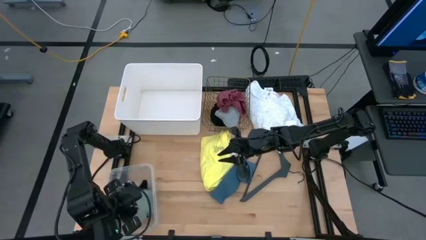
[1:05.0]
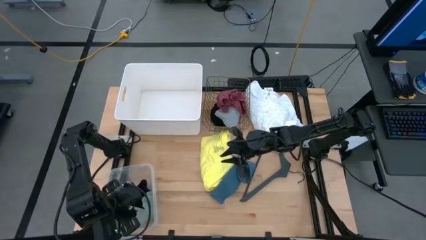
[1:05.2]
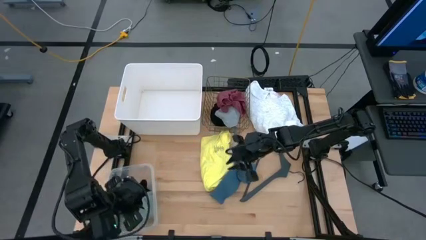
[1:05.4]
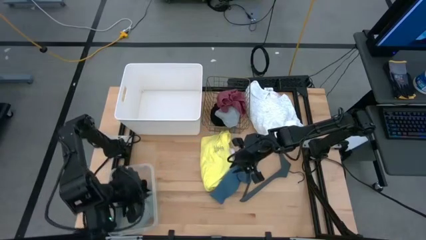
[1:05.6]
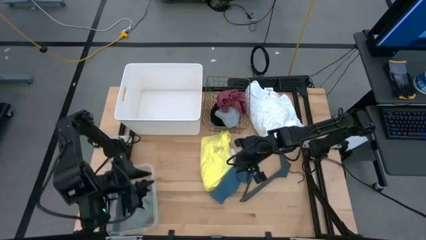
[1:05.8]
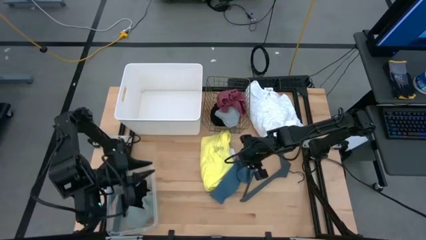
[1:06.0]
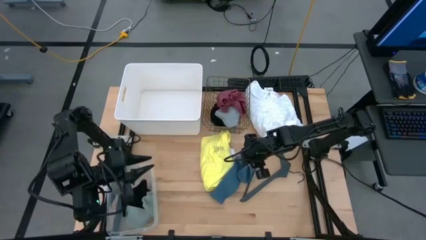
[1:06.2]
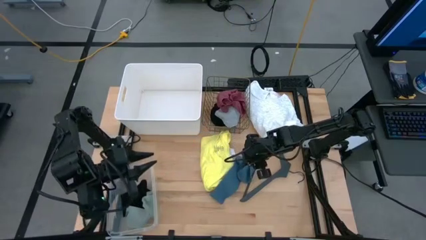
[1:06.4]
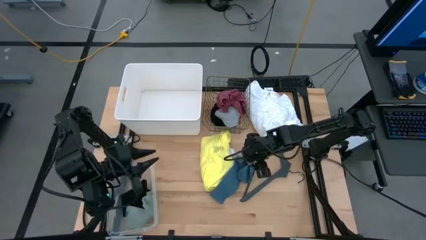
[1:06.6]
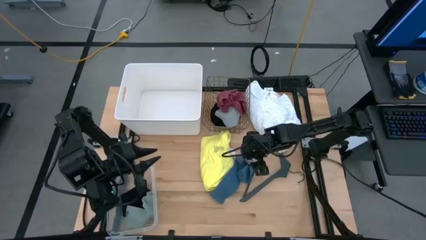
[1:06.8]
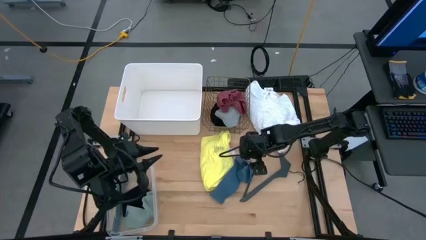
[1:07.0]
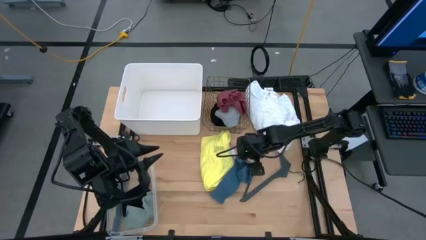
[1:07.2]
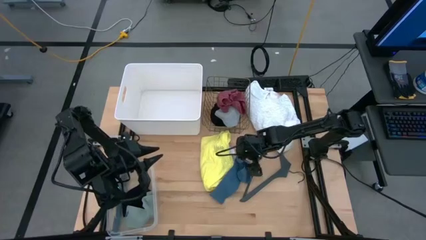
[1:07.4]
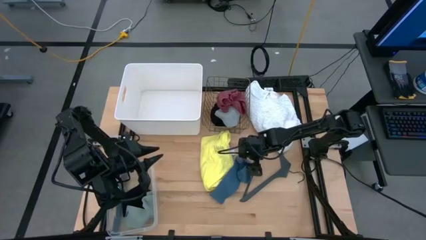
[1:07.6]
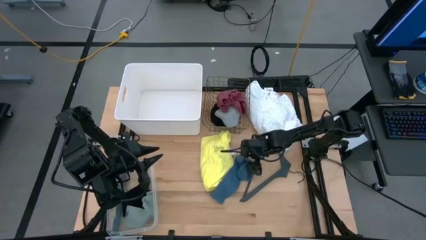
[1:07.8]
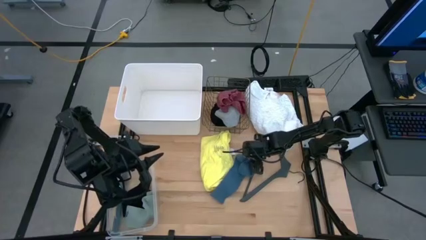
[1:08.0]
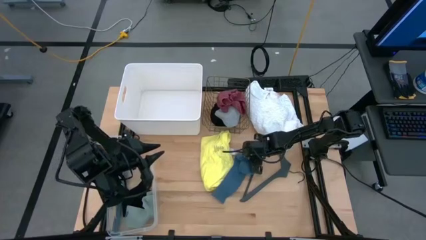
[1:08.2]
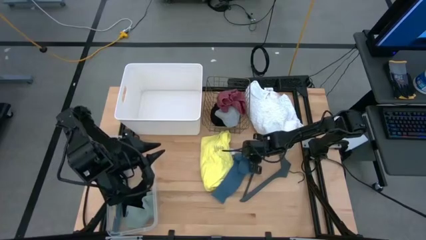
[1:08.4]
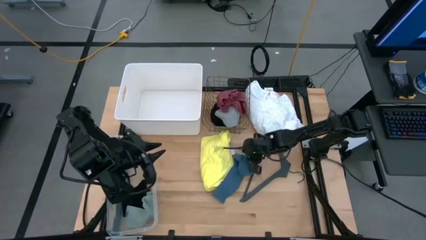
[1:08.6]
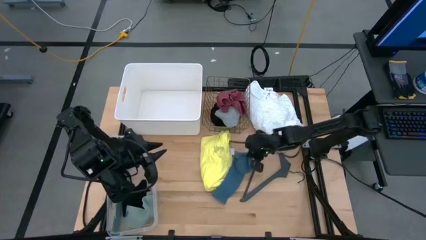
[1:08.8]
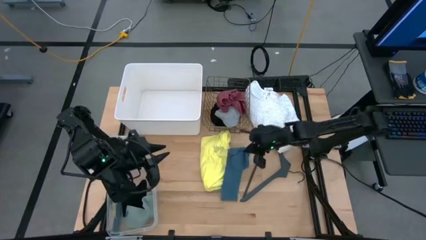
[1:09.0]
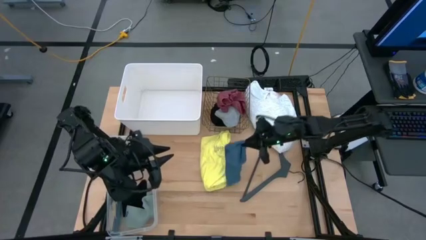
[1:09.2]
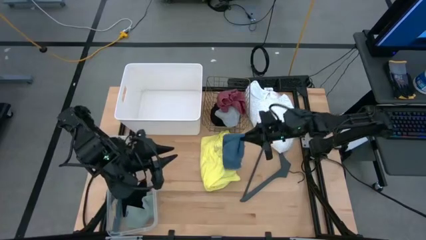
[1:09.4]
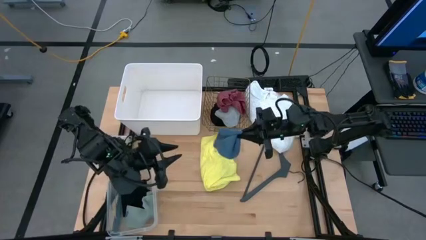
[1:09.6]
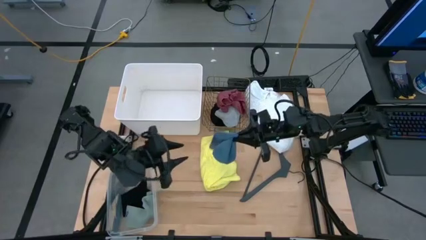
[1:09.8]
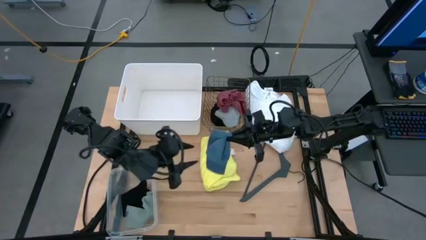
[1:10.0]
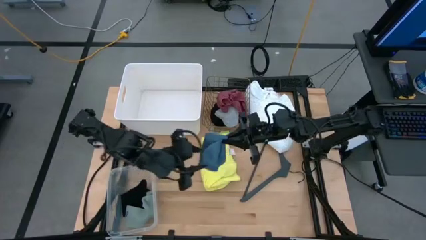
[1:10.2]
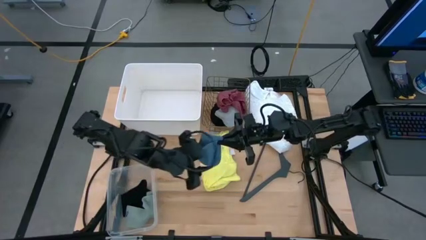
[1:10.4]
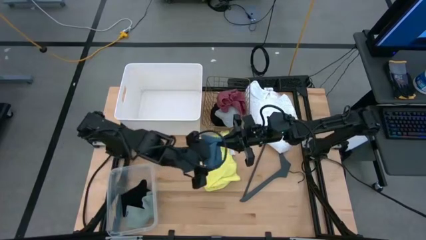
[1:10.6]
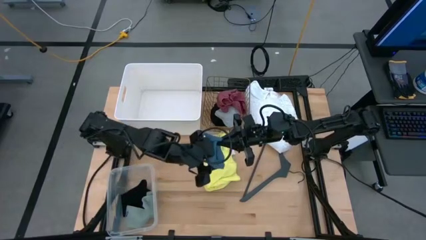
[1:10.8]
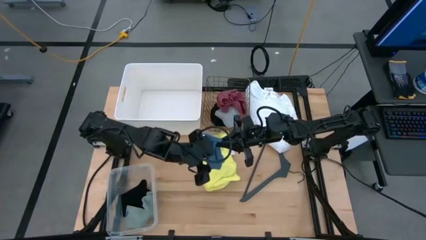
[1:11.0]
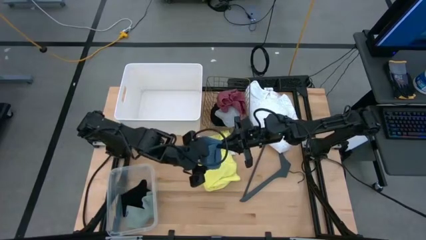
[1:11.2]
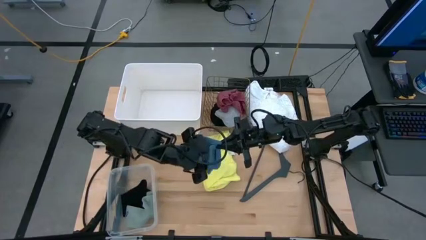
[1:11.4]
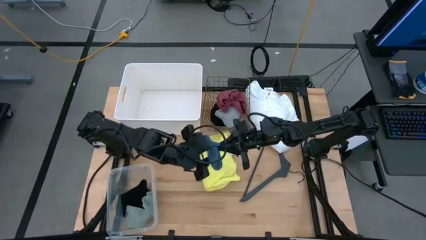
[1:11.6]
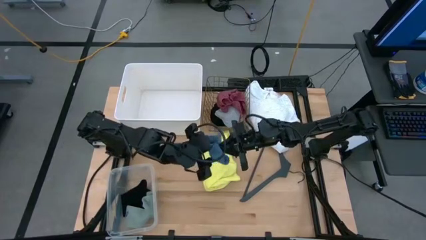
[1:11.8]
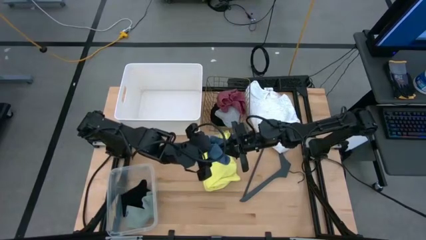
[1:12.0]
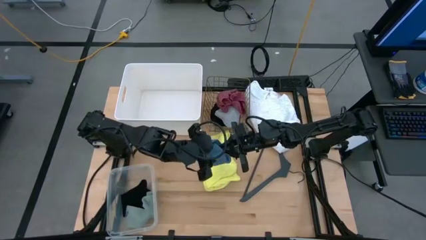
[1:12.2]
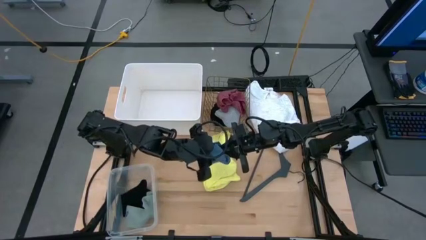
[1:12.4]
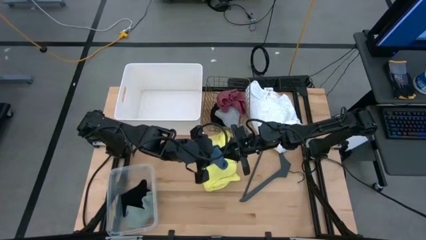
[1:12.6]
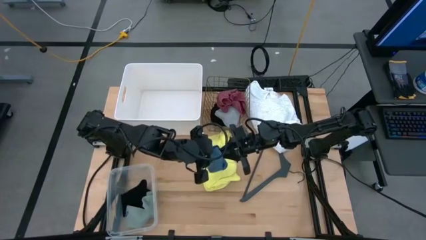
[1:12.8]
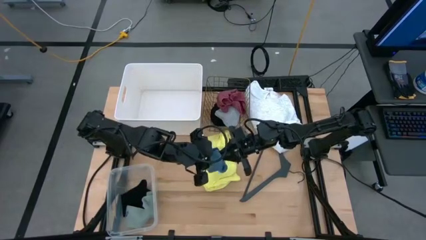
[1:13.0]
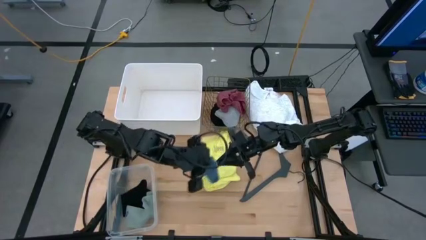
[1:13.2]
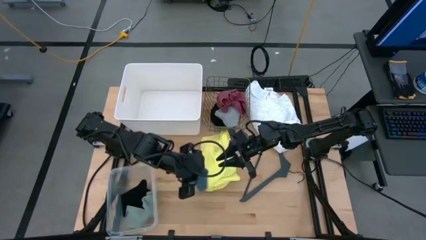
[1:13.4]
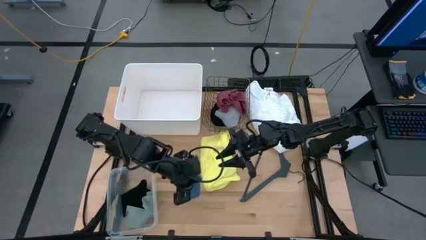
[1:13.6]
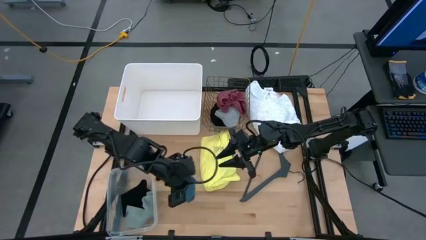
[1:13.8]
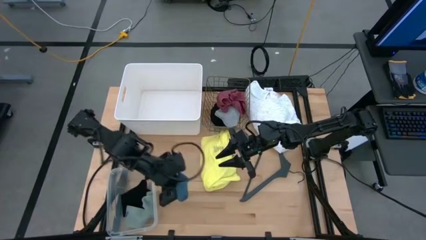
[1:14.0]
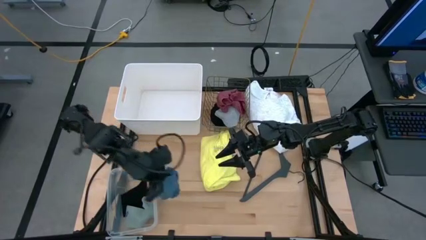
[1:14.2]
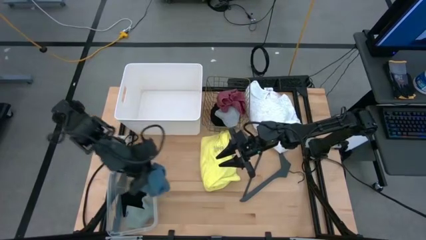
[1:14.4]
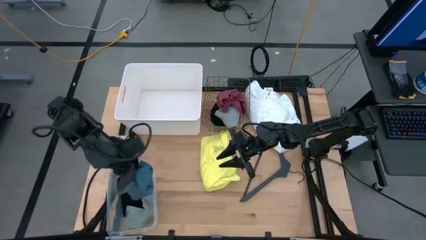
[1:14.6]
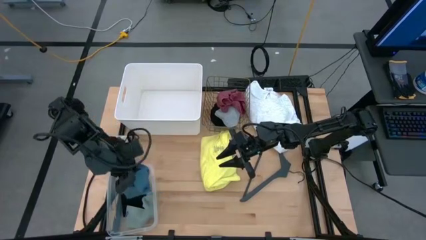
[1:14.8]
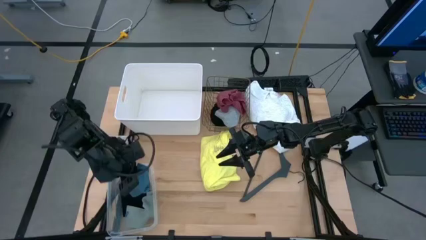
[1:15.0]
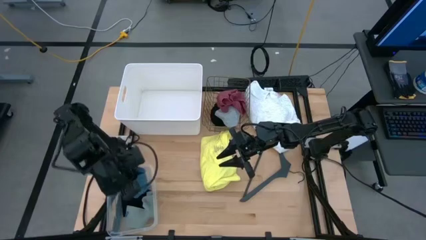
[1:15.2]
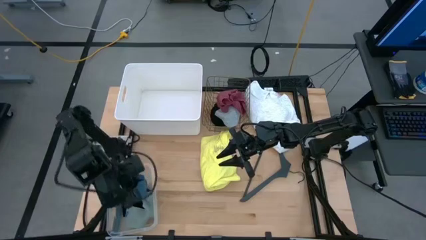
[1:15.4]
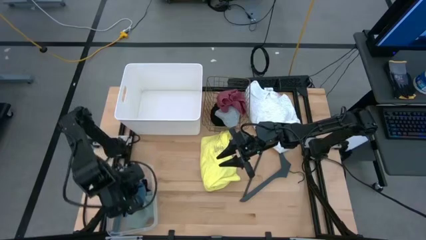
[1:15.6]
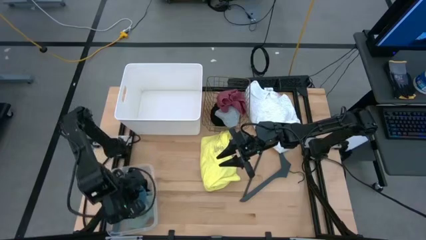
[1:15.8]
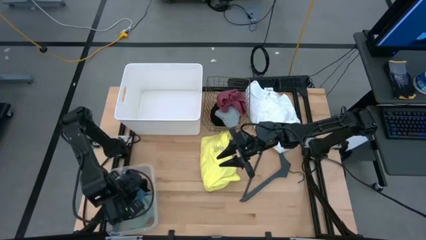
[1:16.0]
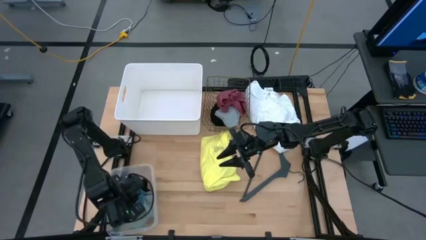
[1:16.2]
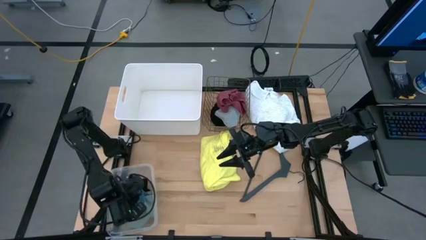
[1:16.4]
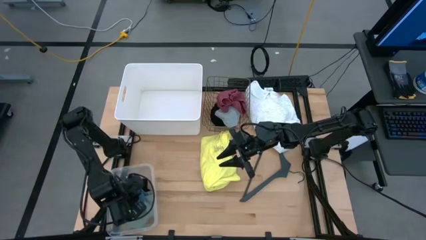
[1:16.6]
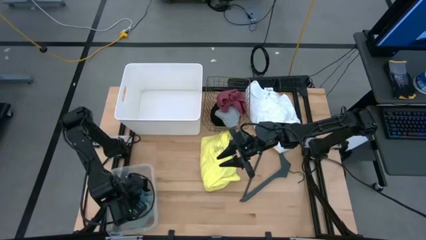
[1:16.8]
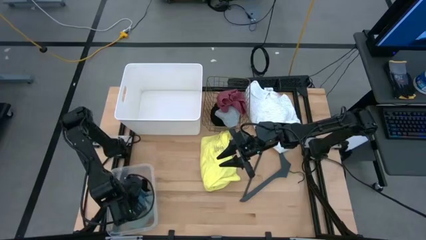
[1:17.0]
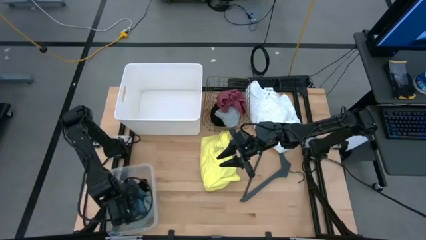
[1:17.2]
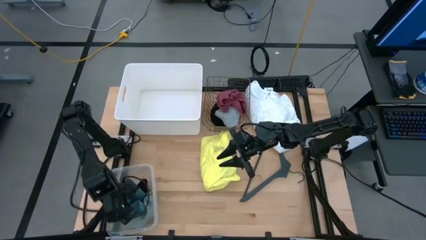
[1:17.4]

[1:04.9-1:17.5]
Task: Pick & Place Cloths
Put the blue sock into the transparent bin

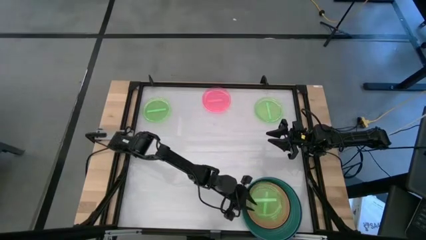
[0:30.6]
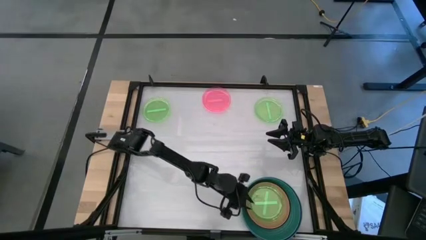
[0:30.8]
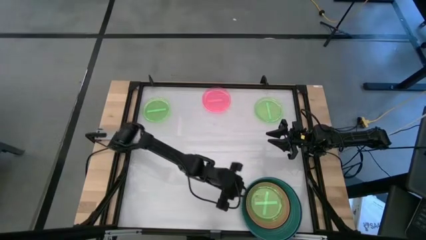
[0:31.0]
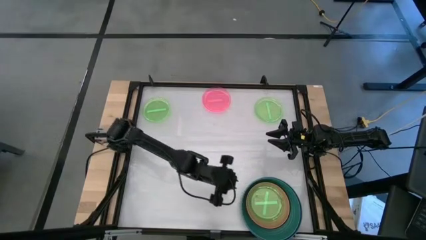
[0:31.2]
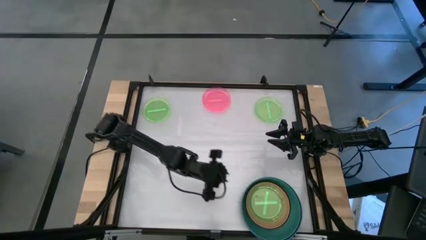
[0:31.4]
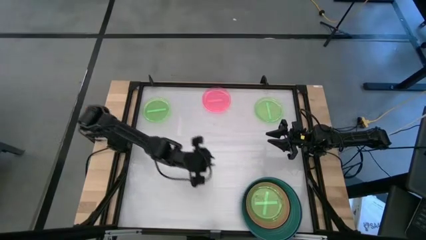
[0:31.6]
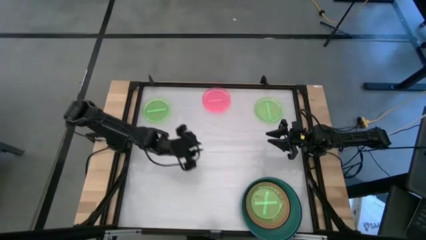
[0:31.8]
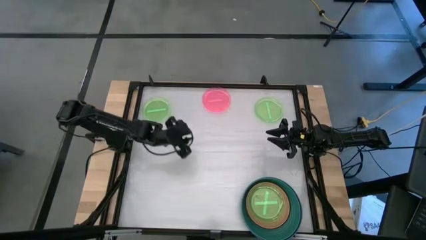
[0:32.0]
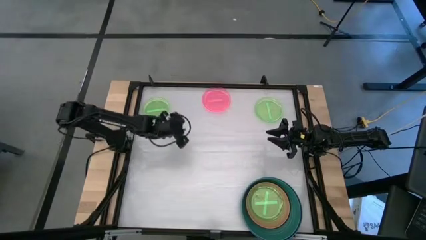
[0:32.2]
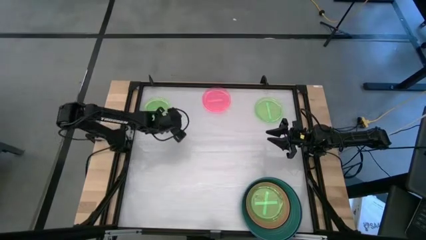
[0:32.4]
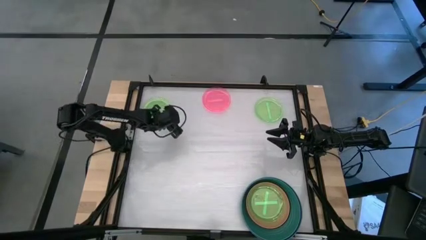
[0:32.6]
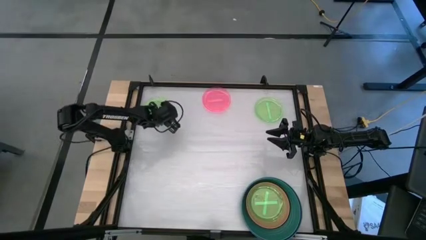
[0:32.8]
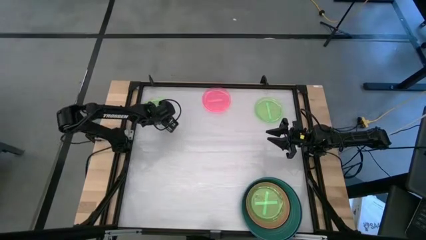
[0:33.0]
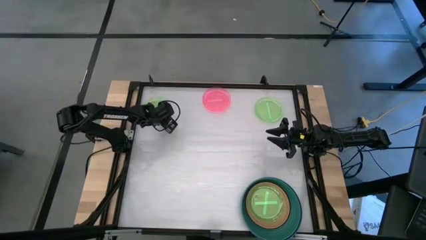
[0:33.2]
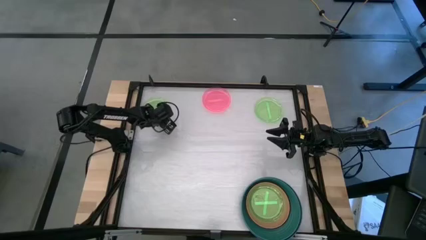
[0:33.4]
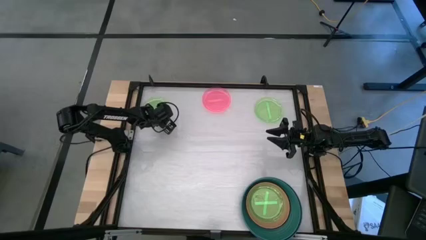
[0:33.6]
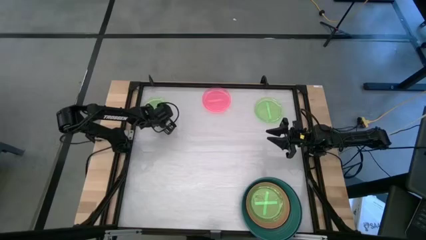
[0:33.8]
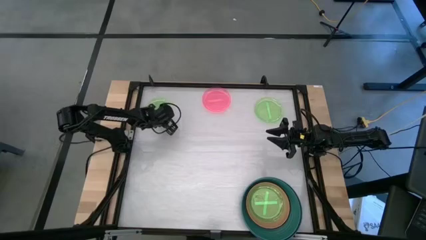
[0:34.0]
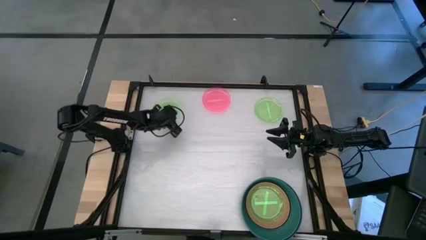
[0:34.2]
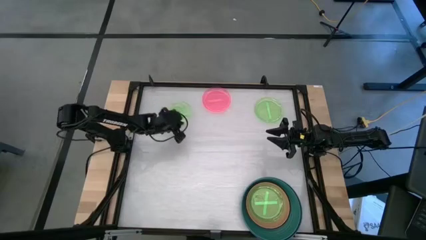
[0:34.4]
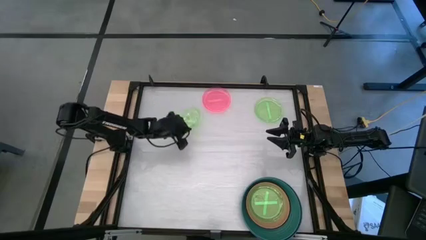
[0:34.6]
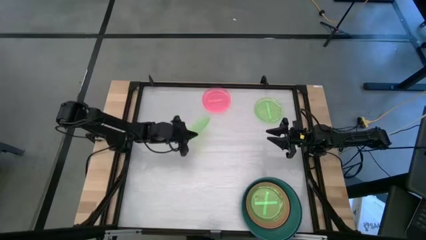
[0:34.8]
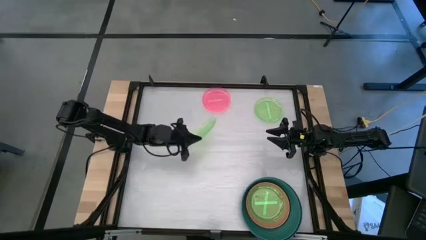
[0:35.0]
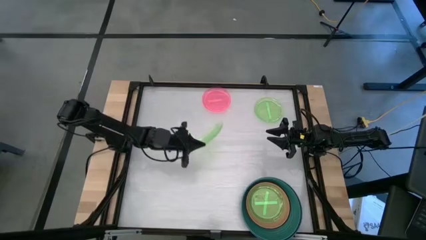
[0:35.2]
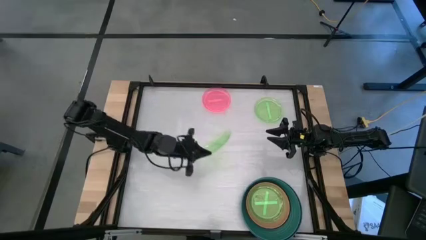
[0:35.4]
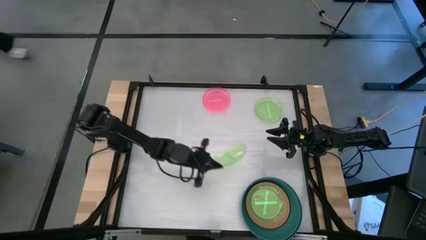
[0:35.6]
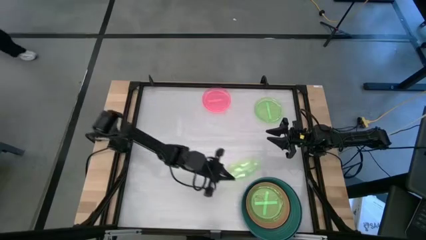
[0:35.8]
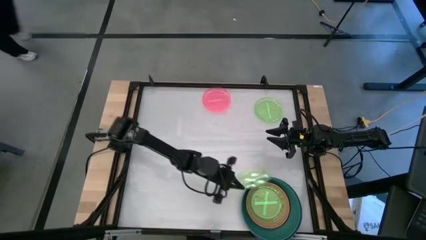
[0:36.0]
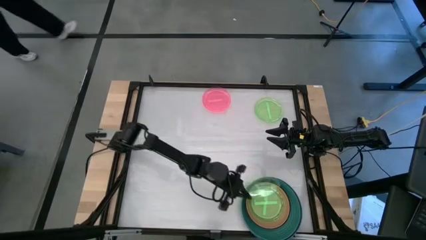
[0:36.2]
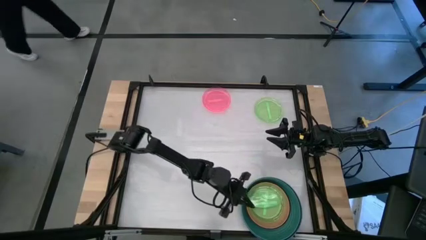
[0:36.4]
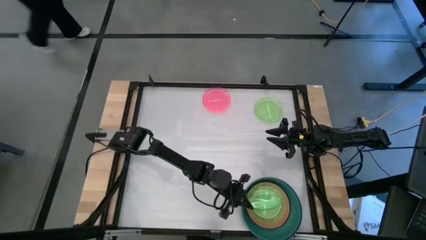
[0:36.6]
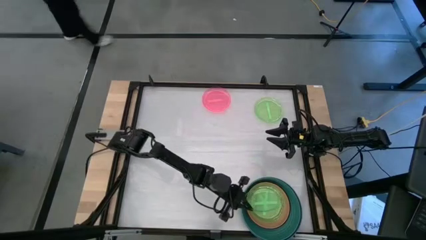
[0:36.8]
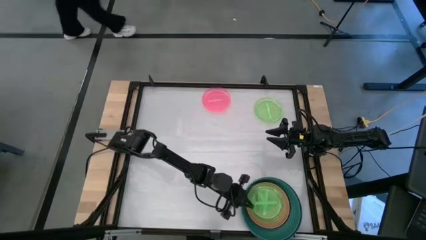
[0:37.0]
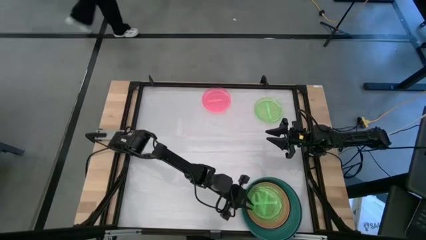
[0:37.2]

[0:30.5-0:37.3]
Task: Stack plastic plates
Stack the light green plate on top of the light green plate
